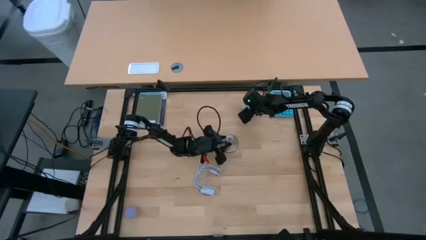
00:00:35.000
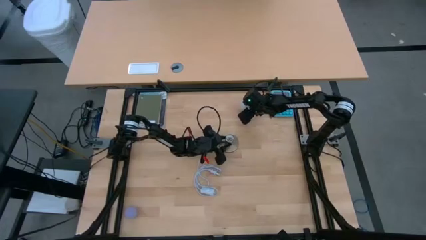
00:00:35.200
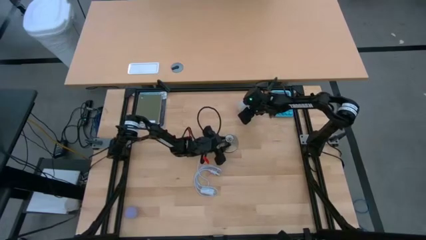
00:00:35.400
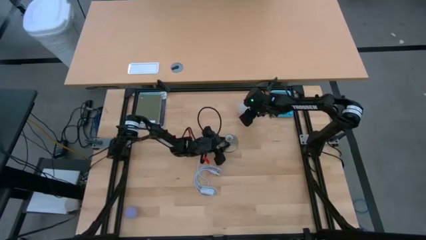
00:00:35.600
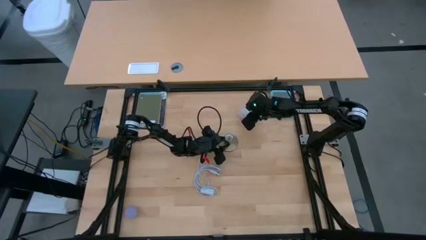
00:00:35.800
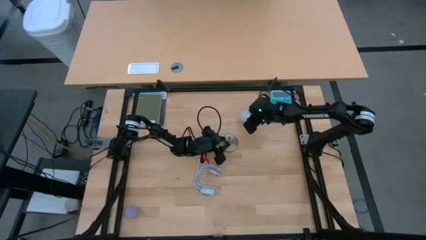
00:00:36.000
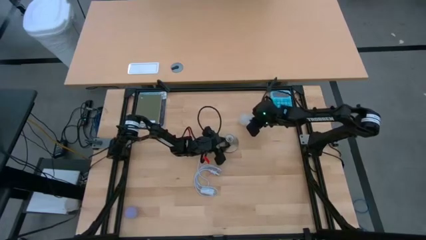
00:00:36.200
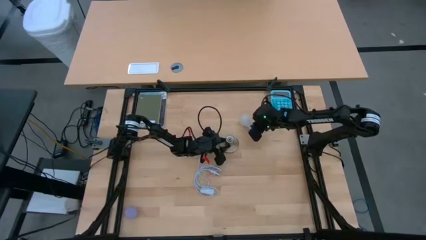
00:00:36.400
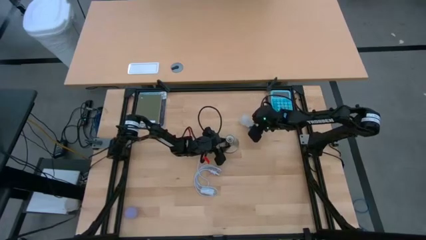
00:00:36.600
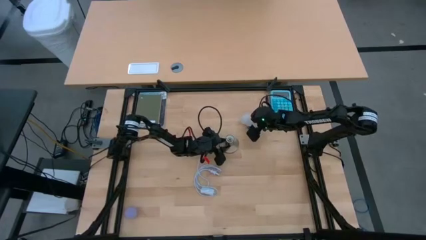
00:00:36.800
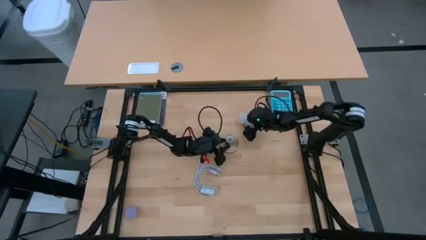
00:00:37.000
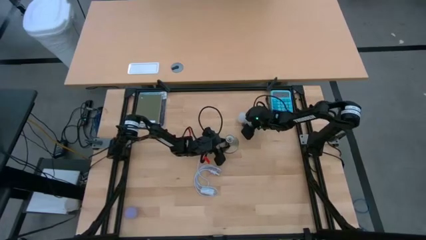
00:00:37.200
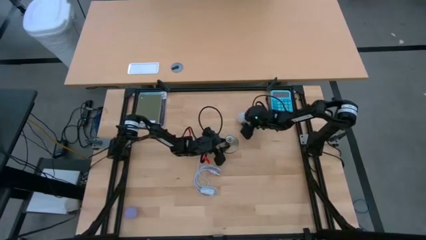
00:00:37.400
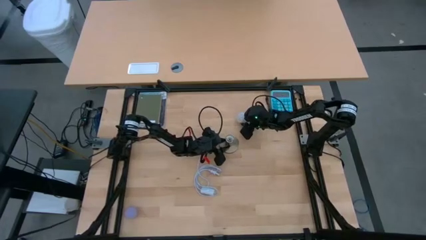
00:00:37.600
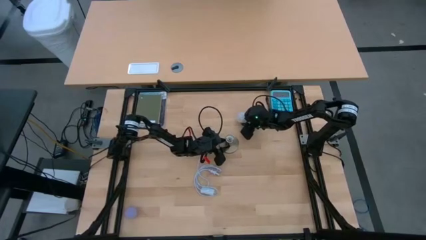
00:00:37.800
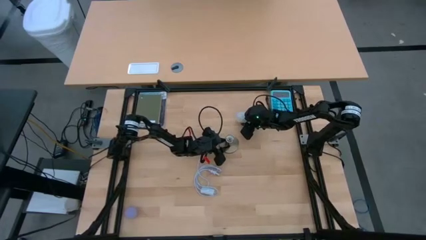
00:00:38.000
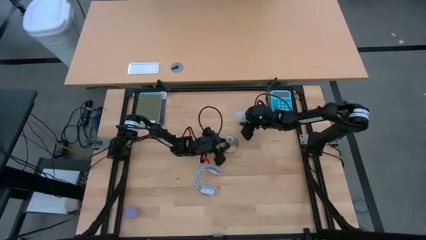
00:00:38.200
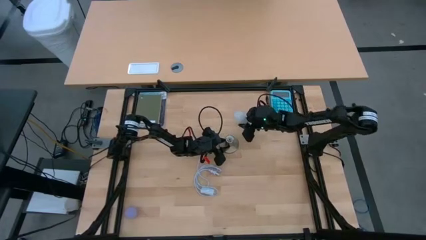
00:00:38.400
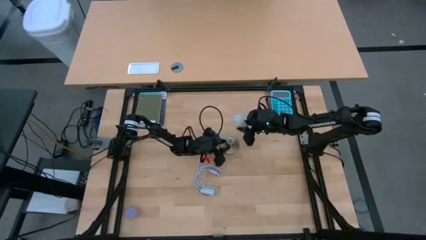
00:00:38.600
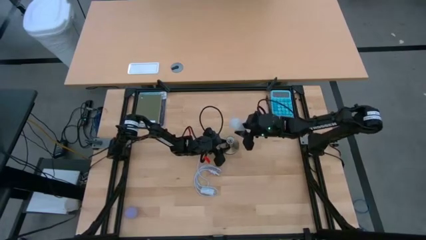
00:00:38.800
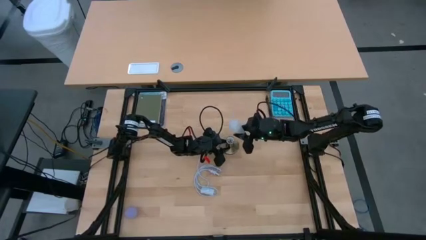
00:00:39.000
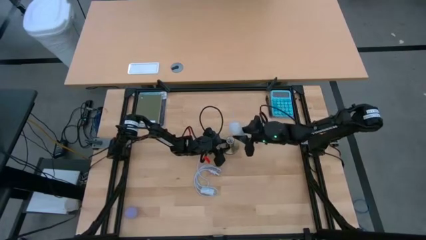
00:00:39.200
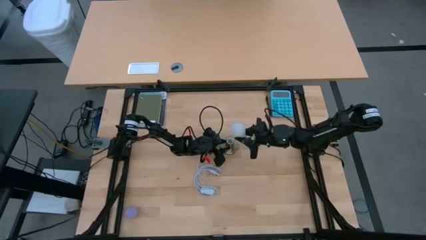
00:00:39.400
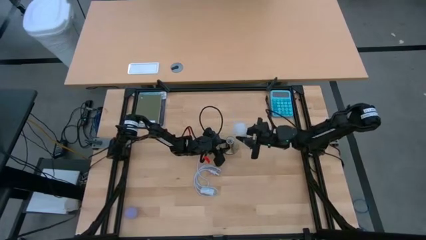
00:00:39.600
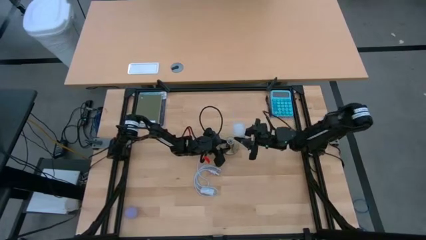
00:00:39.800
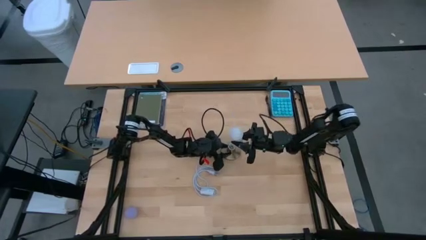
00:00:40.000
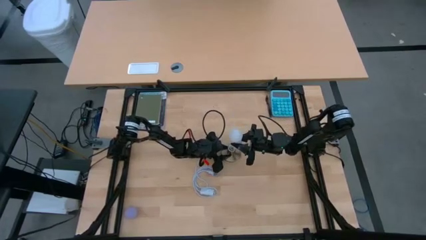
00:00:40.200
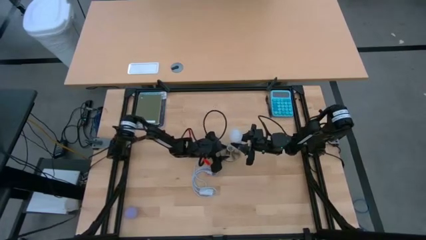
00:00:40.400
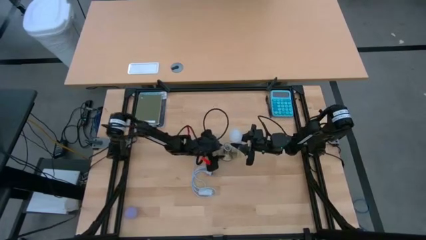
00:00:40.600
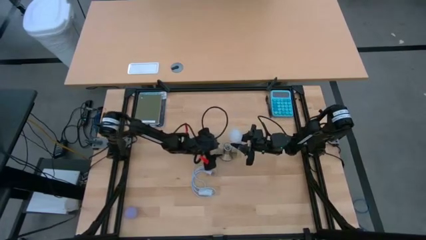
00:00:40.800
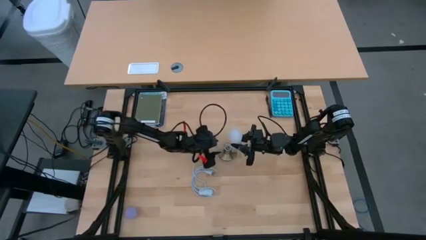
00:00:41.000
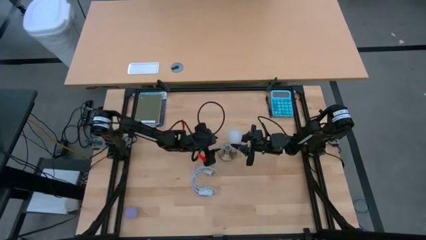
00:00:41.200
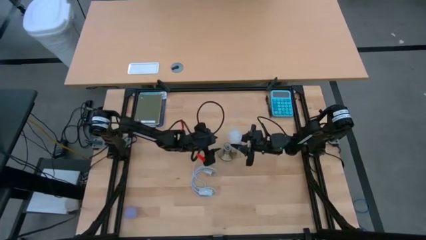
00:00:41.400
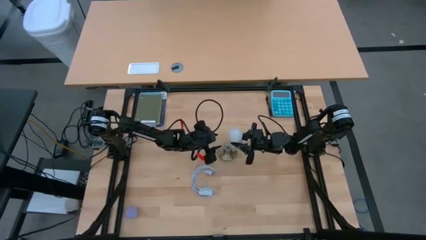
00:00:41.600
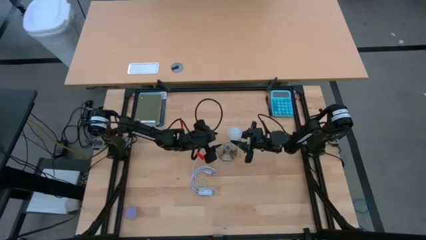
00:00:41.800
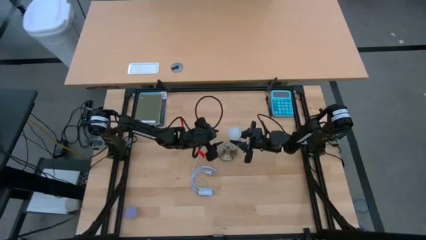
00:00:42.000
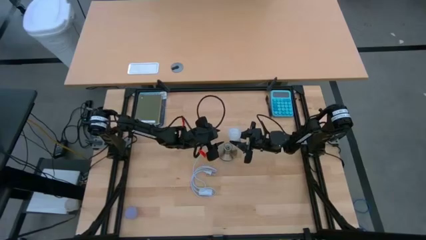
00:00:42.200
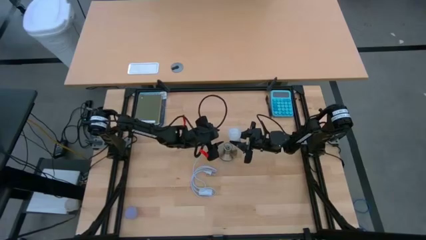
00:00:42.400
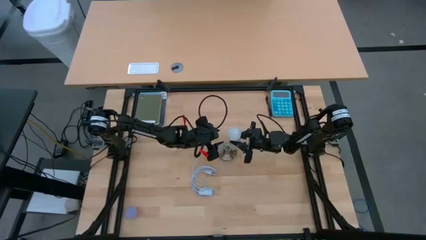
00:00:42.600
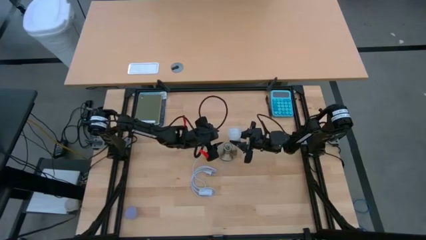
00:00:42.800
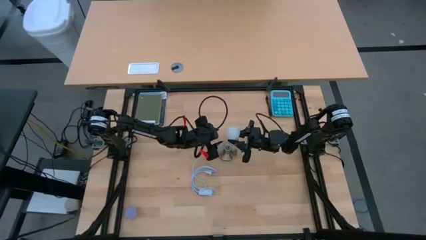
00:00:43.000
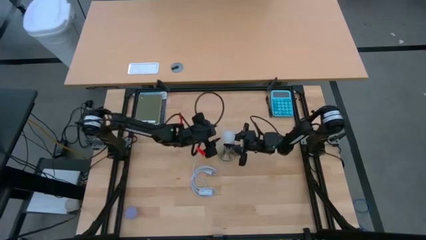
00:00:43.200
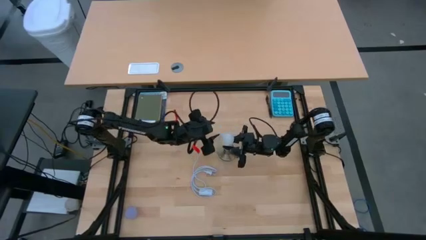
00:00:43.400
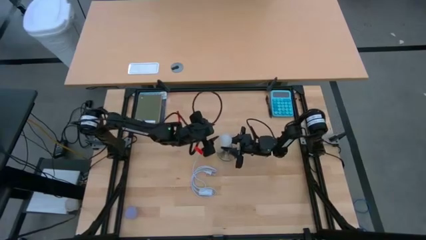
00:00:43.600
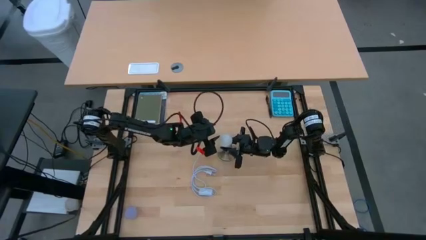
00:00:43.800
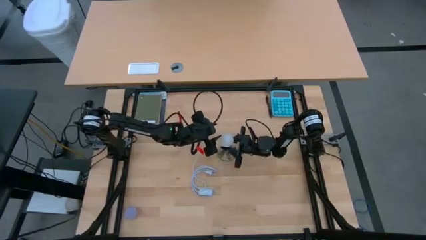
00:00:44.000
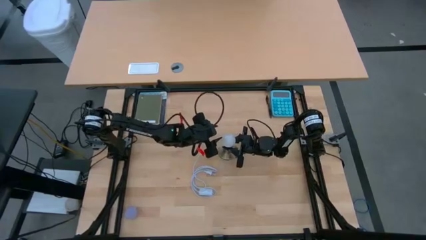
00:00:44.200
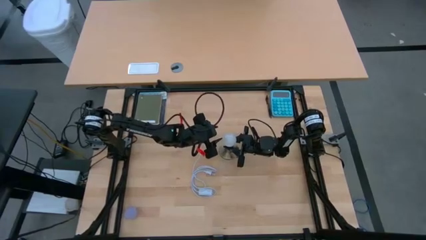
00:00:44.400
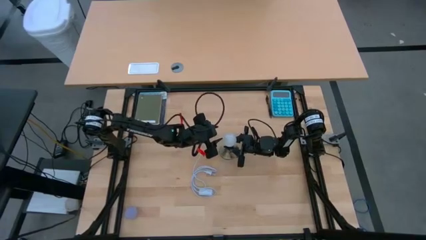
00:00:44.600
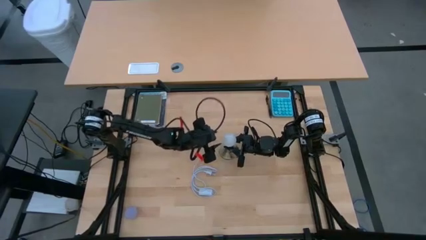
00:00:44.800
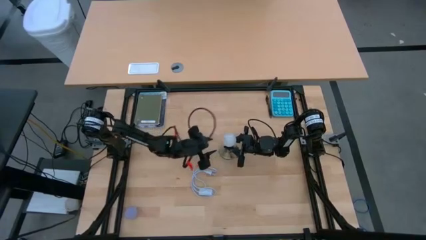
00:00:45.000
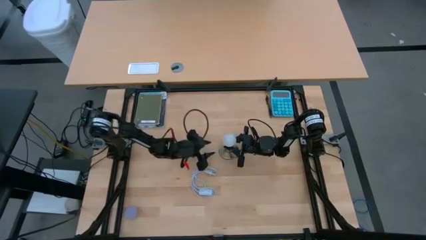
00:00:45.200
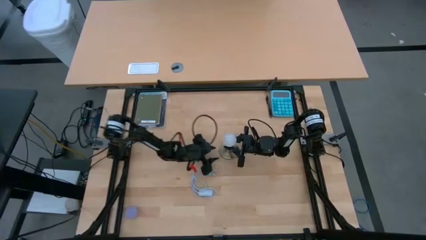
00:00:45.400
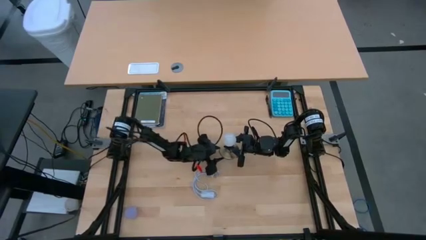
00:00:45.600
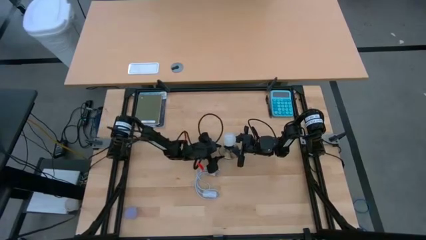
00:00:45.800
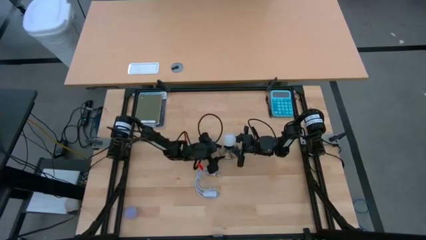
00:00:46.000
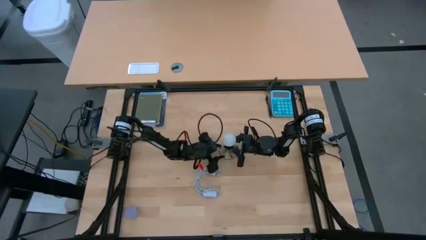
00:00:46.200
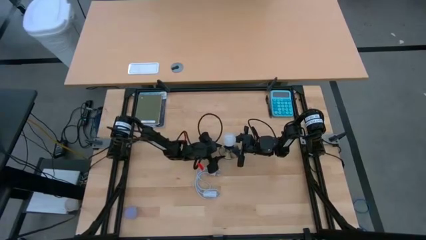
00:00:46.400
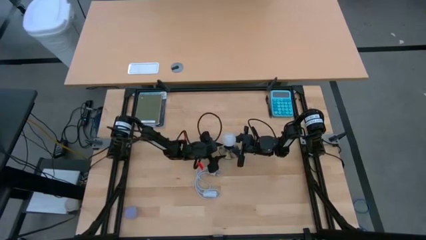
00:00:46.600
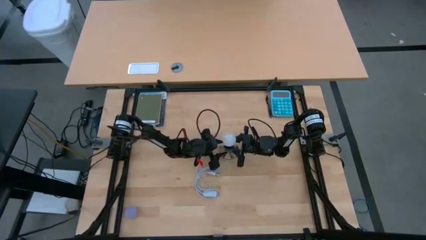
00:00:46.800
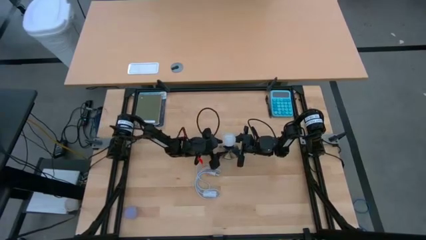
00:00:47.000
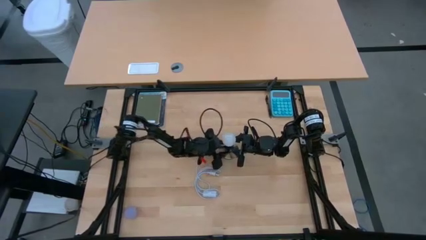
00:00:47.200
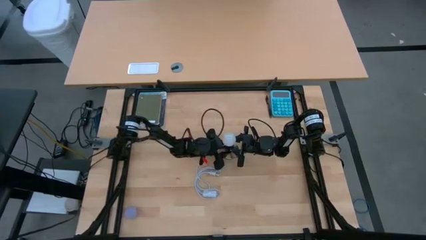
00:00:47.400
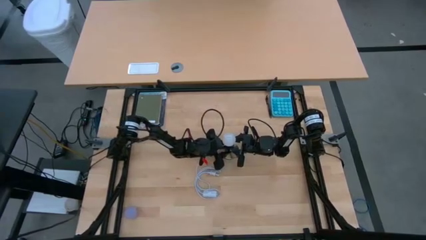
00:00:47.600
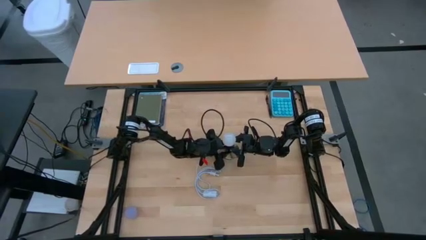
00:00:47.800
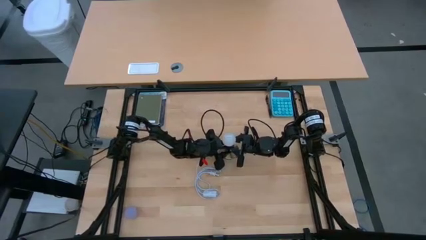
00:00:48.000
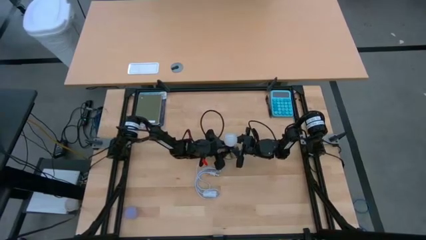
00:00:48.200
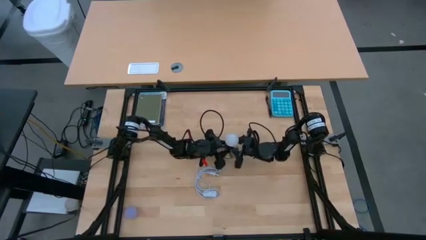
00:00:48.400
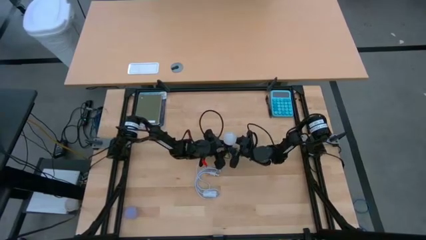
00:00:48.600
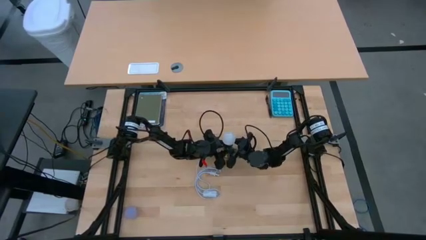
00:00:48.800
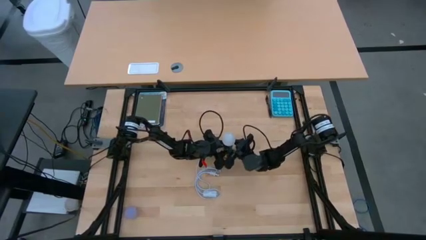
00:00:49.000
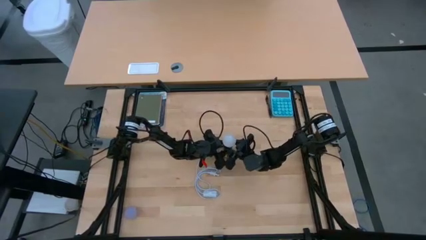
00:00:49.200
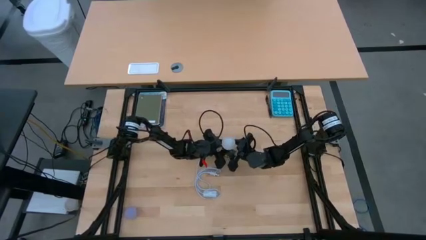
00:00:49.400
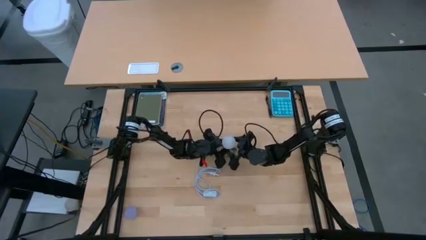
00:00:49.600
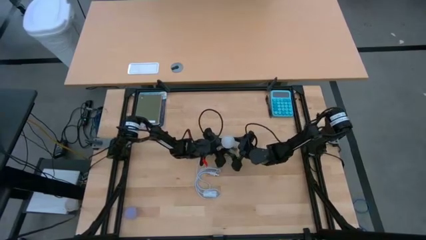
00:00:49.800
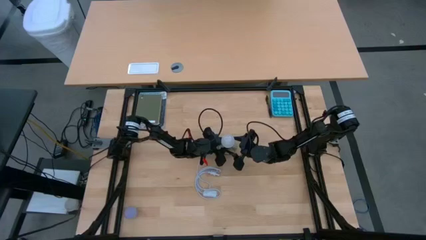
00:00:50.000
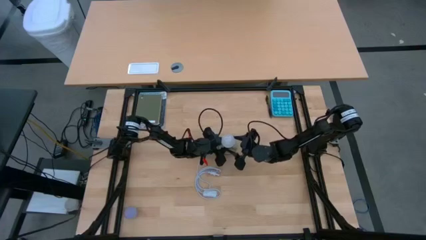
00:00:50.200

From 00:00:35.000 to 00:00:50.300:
Task: Screw lightbulb
Insert the white lightbulb into the silver lamp
